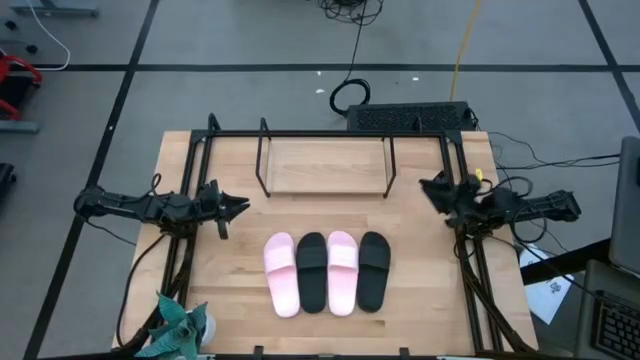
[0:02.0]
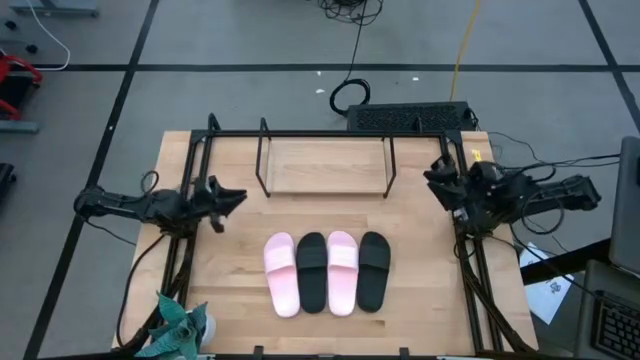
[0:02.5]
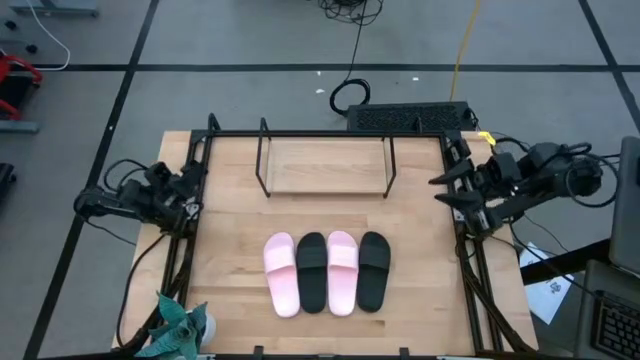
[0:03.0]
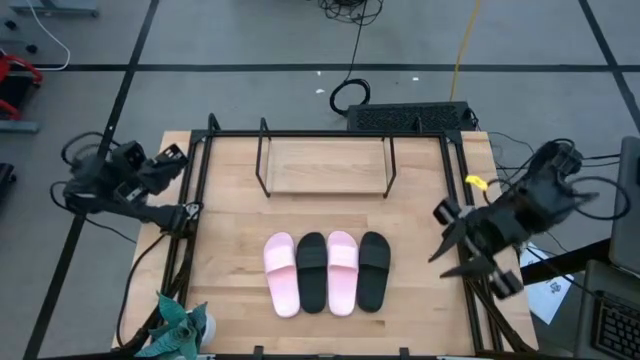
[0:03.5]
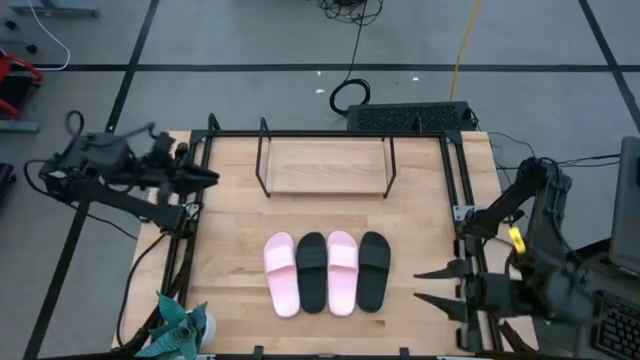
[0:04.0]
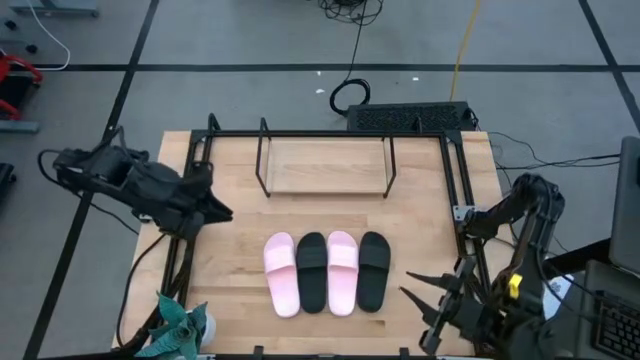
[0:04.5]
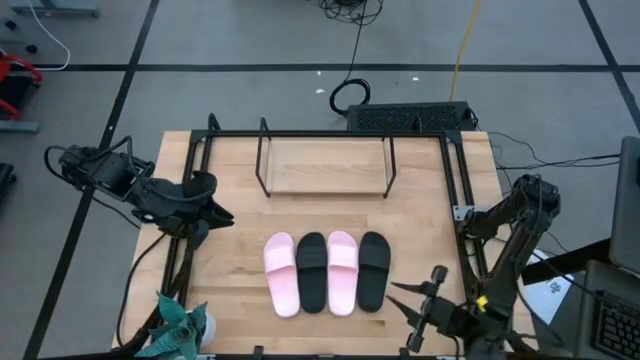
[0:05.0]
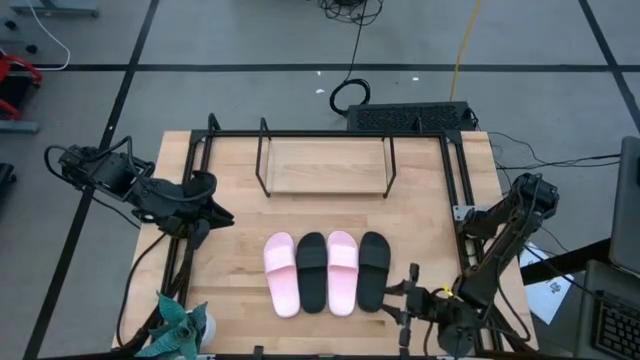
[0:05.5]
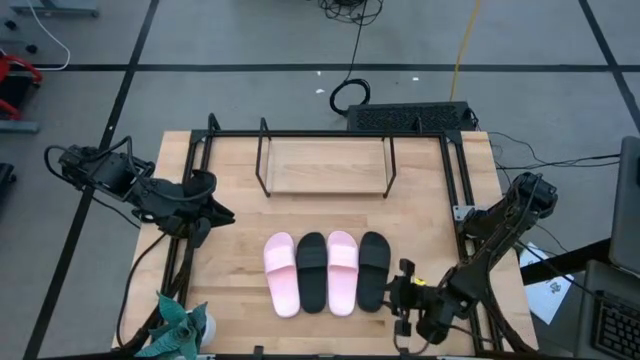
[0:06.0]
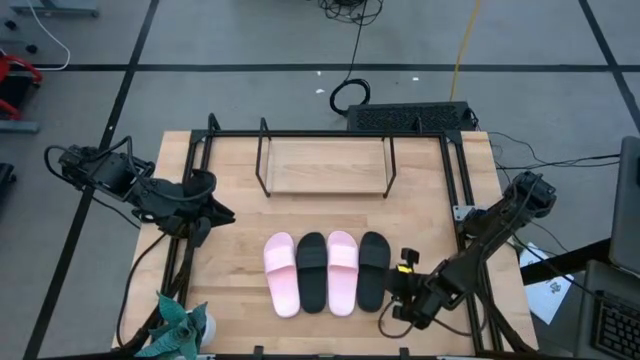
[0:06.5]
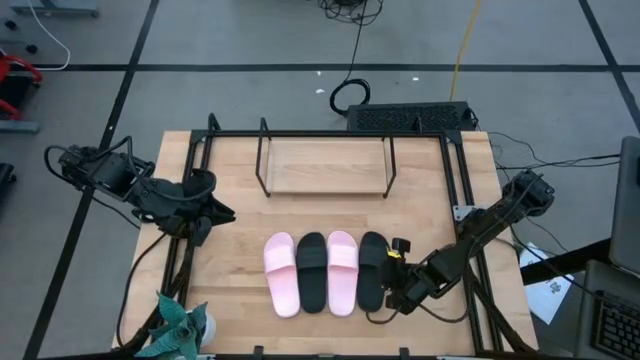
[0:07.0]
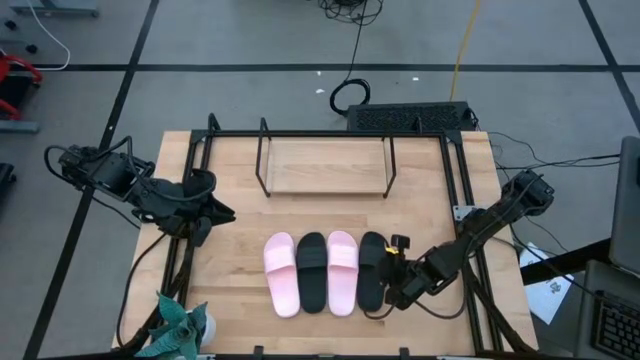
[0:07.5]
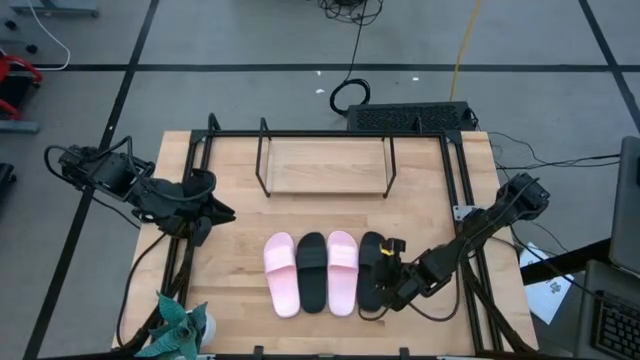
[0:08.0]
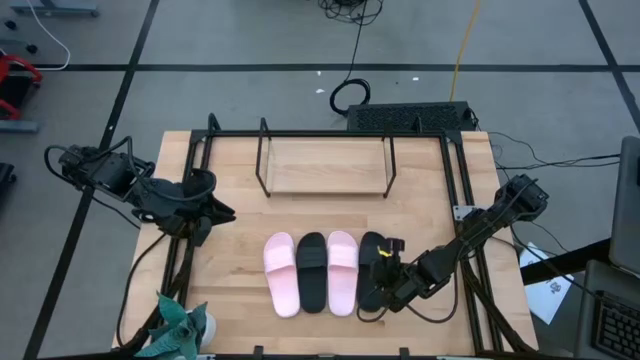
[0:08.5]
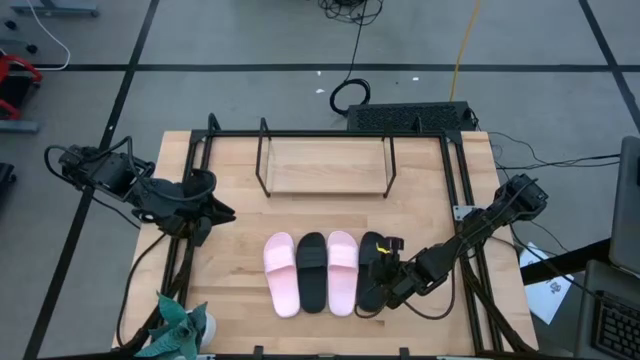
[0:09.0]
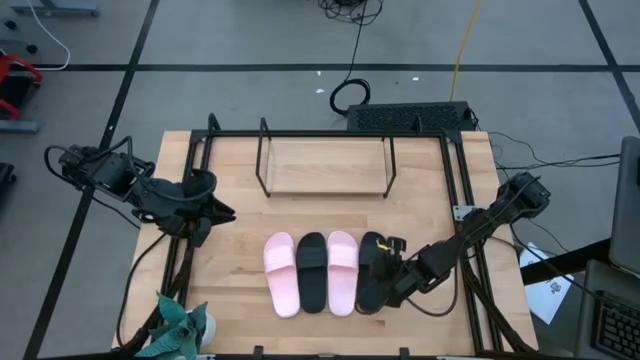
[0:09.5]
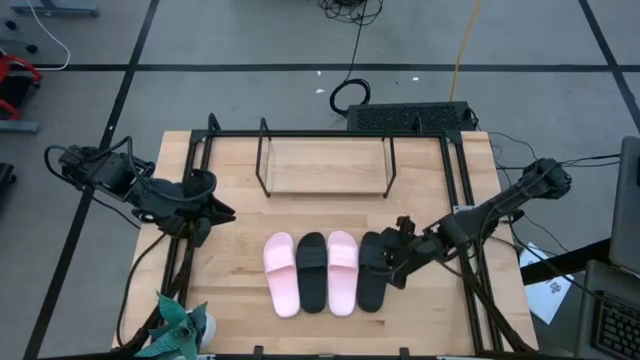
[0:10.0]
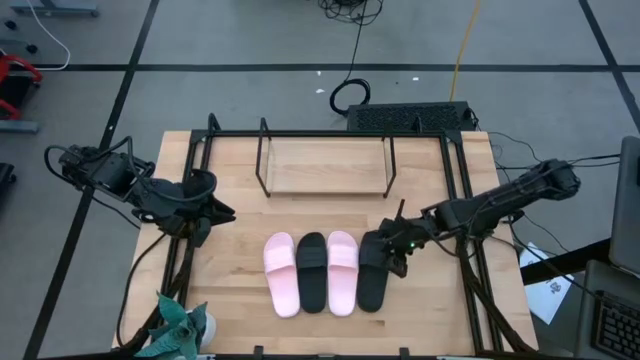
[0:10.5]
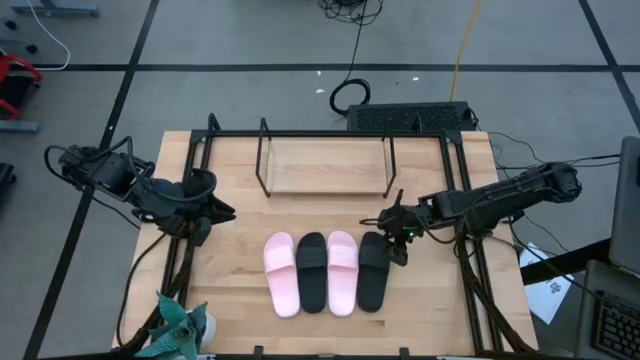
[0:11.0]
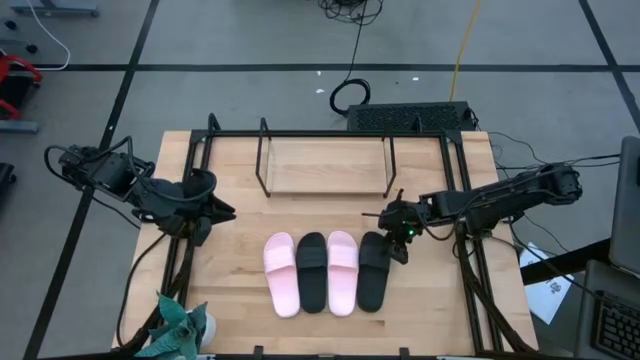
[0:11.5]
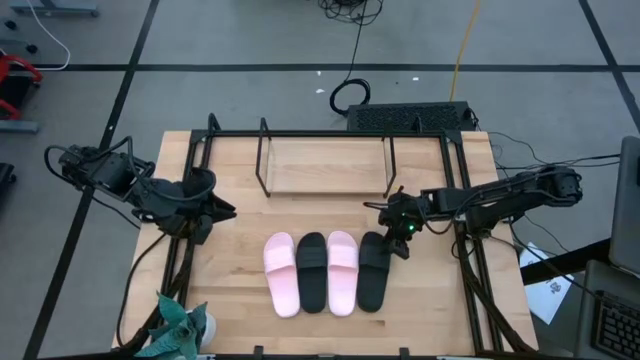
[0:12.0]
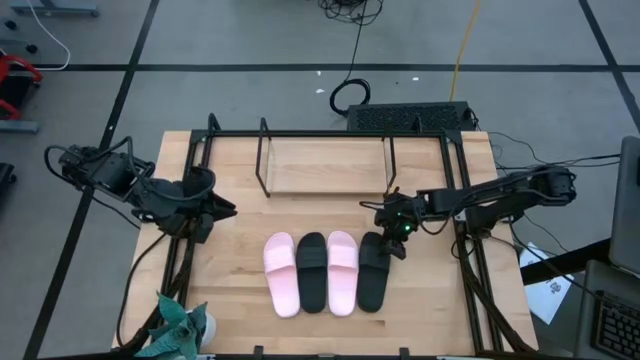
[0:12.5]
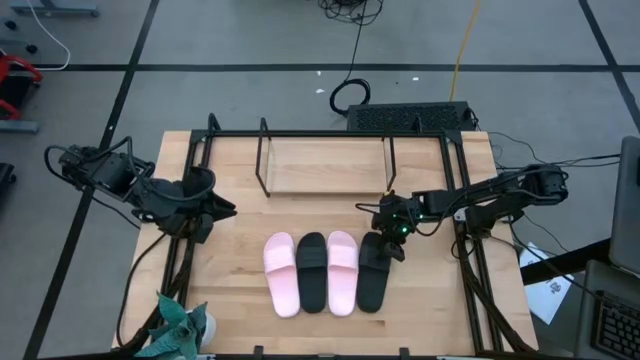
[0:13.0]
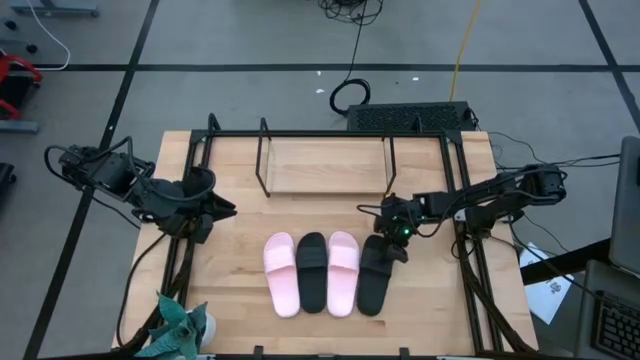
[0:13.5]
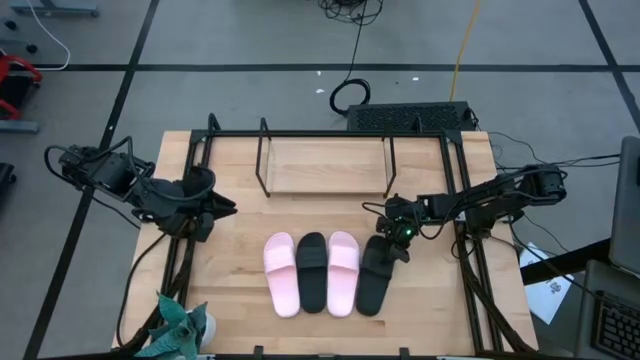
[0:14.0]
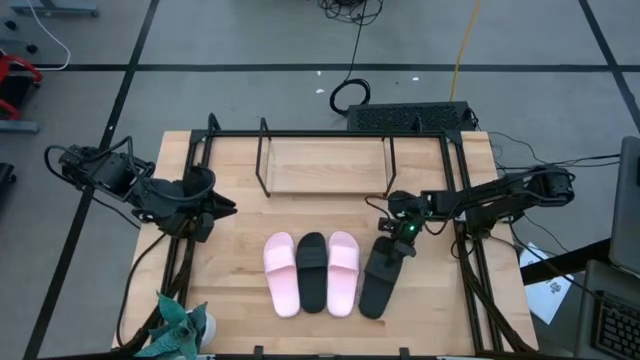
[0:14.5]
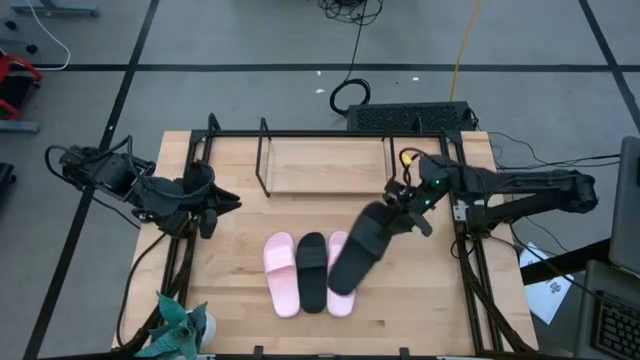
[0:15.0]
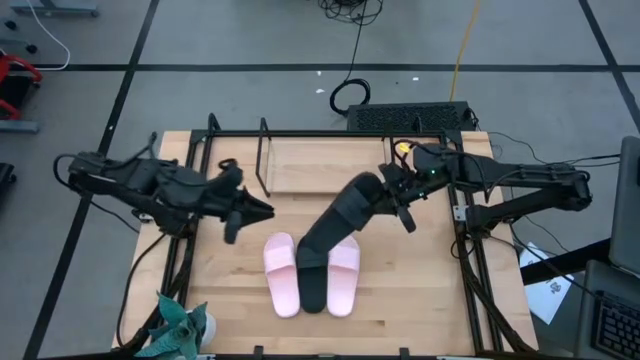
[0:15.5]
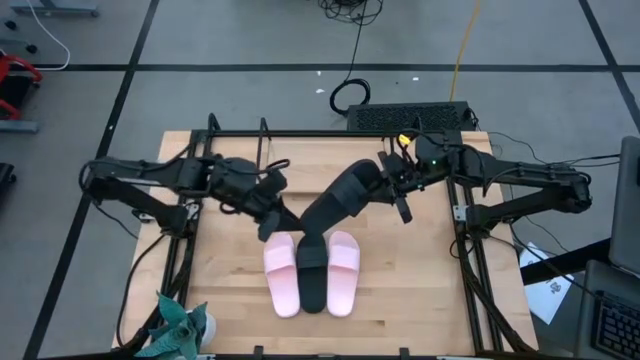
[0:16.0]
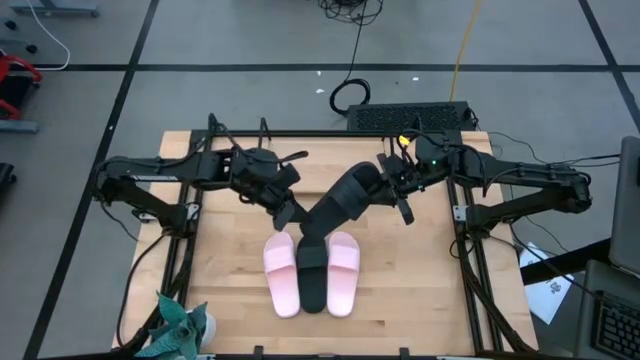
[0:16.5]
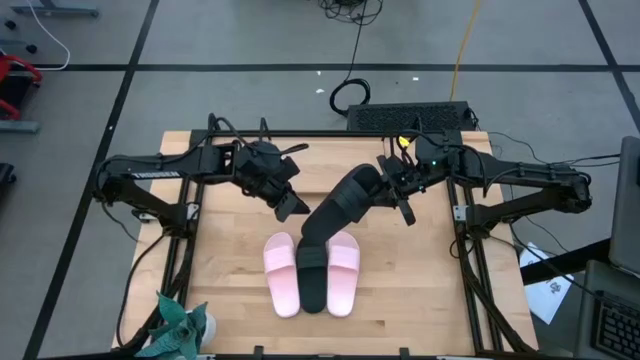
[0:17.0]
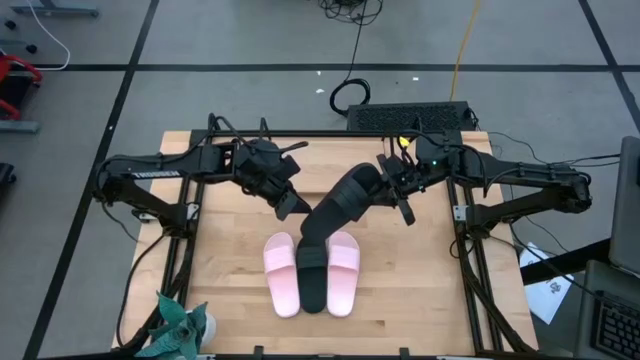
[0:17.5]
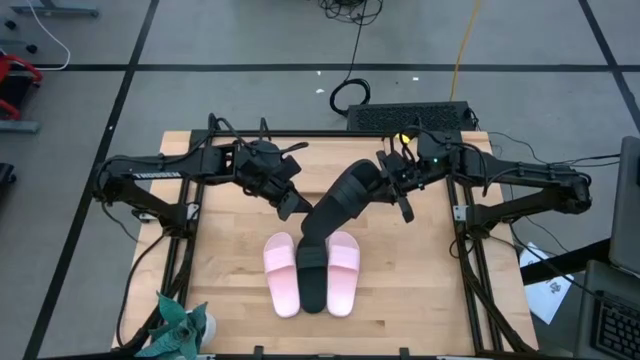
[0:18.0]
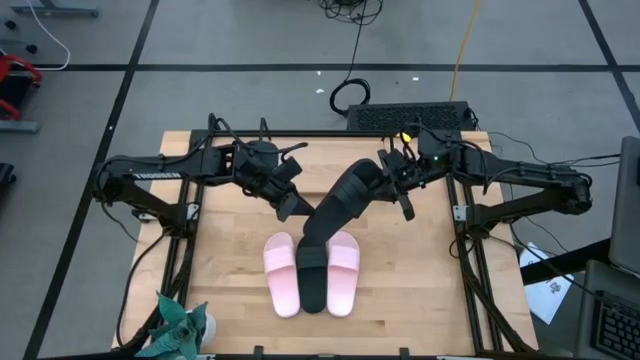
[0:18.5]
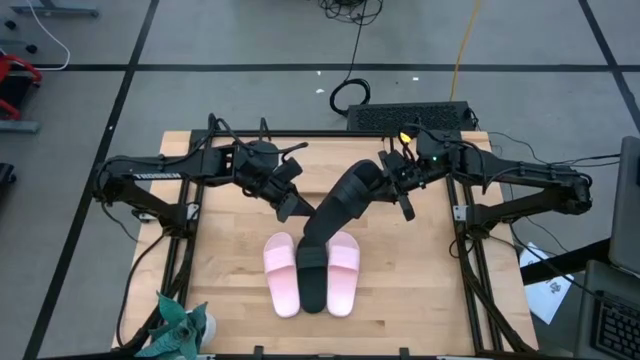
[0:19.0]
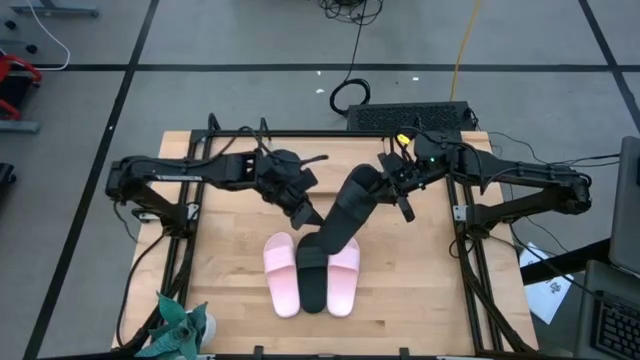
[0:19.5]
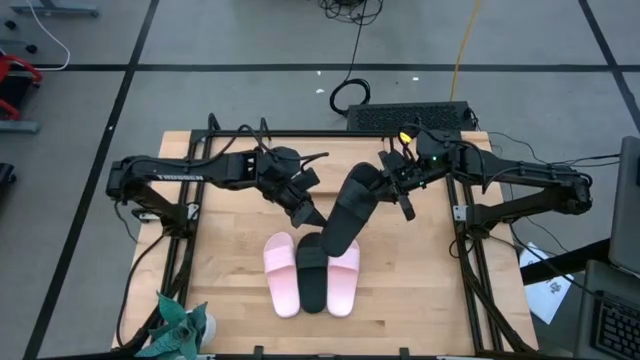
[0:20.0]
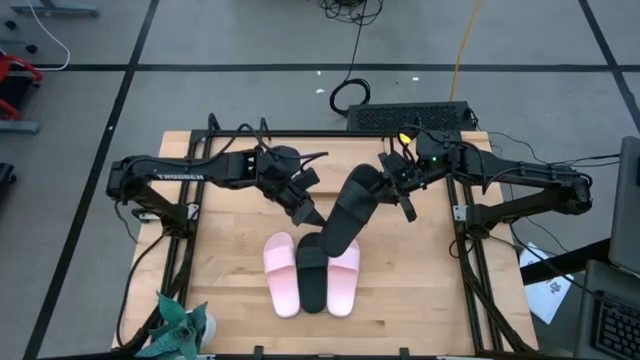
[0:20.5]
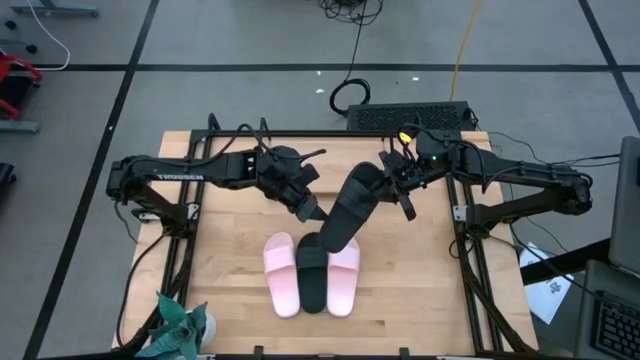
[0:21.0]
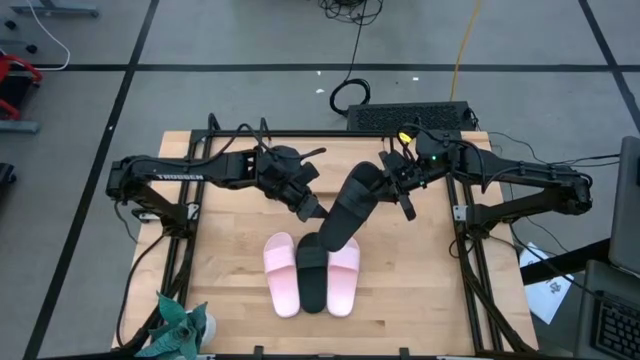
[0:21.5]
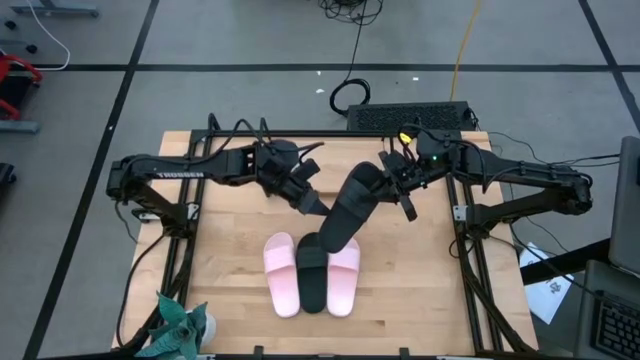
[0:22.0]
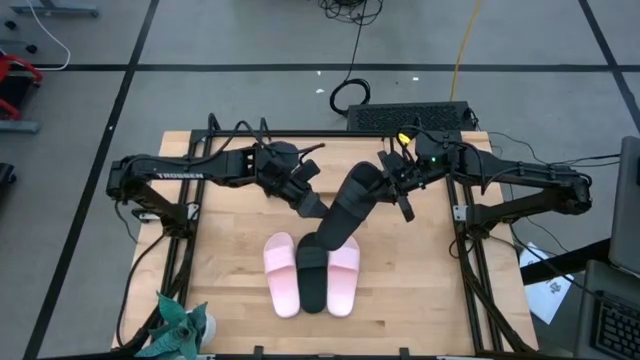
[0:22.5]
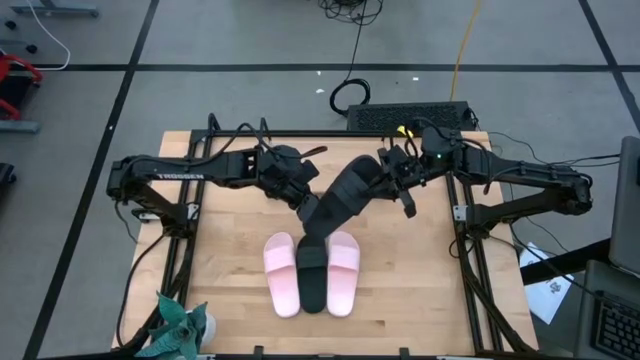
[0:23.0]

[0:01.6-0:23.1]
Task: Pick and place slides into the shelf
Put the right black slide on the shelf
